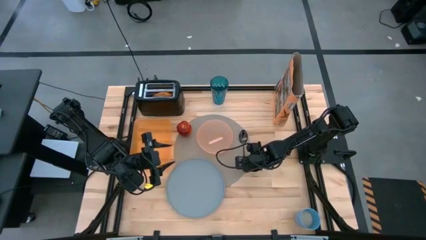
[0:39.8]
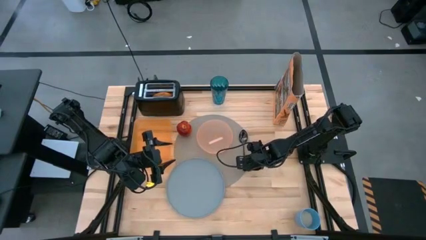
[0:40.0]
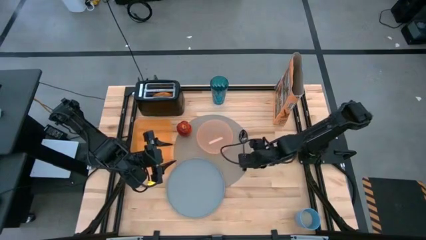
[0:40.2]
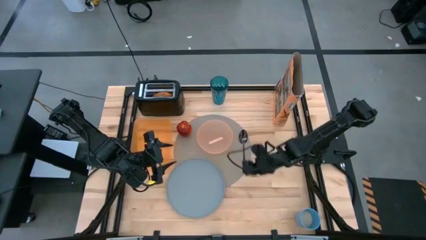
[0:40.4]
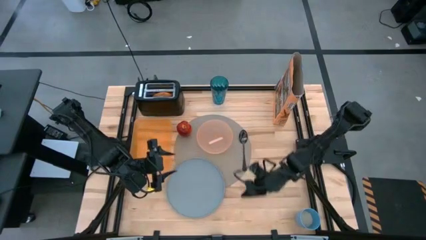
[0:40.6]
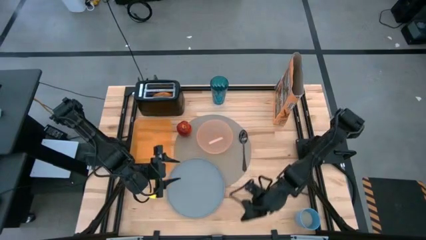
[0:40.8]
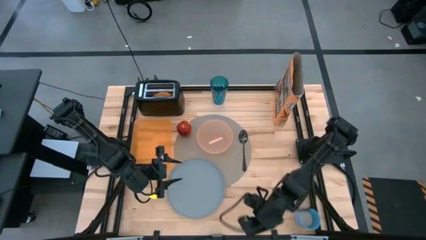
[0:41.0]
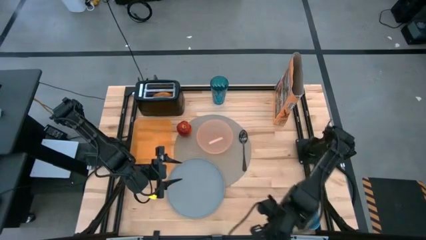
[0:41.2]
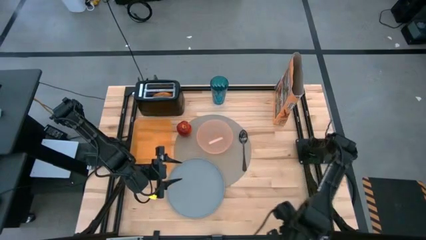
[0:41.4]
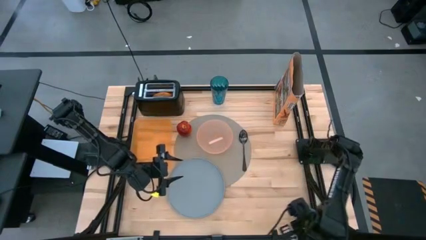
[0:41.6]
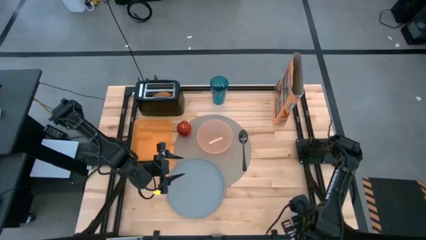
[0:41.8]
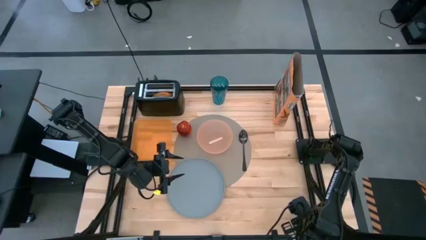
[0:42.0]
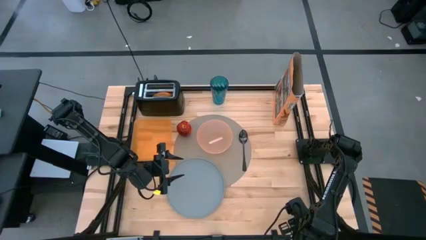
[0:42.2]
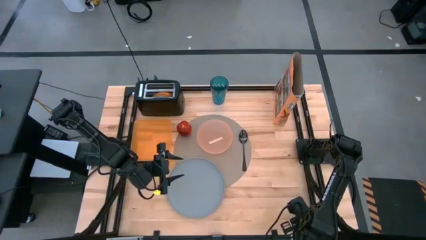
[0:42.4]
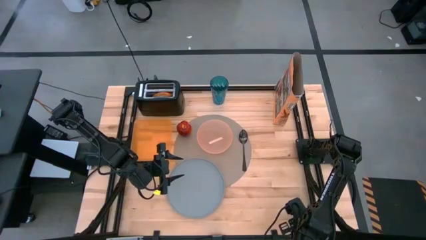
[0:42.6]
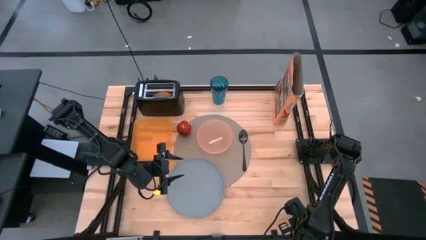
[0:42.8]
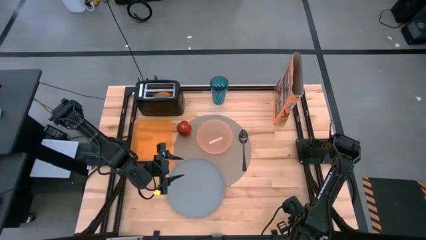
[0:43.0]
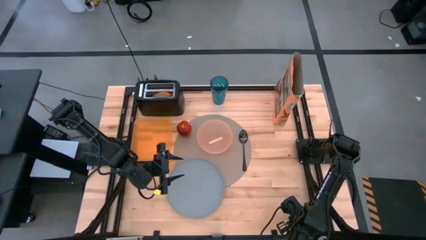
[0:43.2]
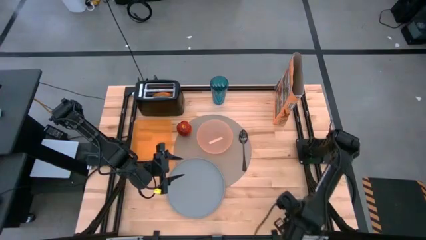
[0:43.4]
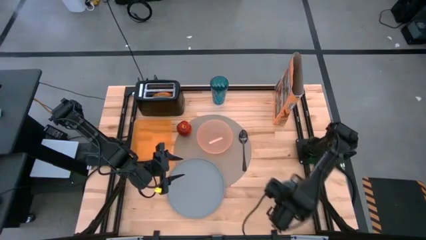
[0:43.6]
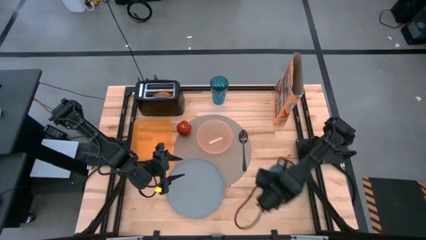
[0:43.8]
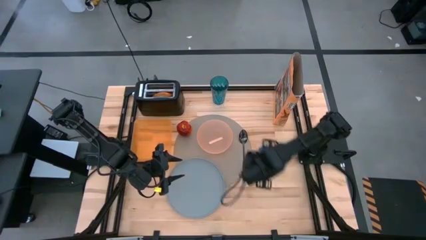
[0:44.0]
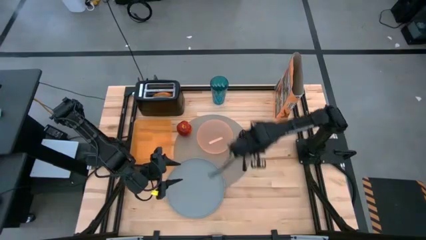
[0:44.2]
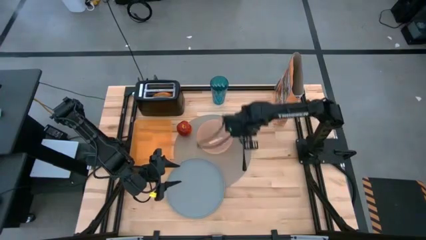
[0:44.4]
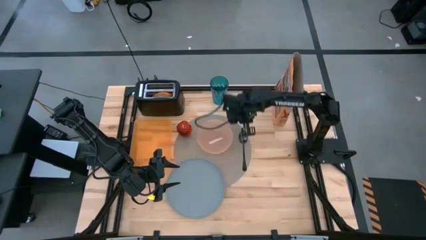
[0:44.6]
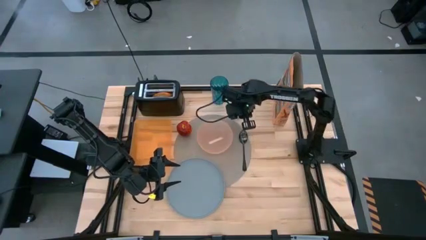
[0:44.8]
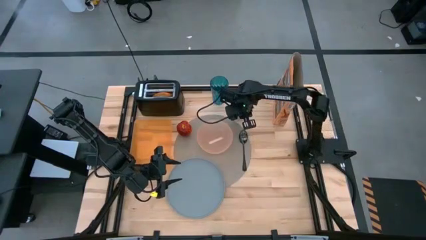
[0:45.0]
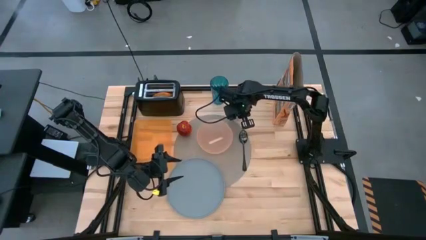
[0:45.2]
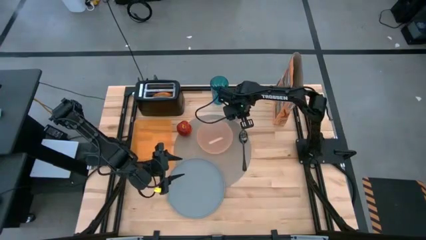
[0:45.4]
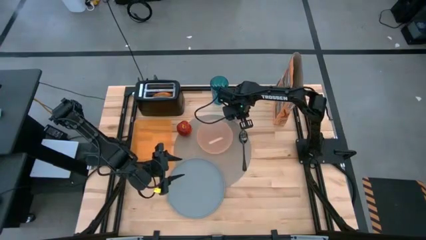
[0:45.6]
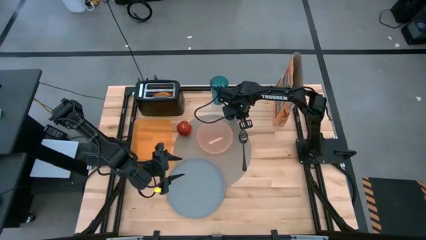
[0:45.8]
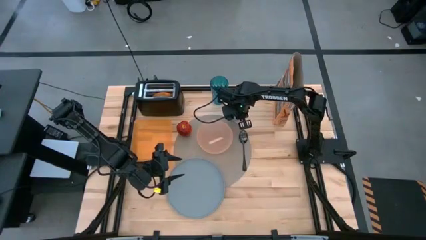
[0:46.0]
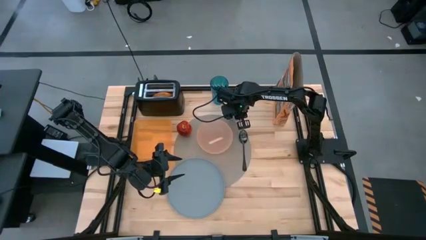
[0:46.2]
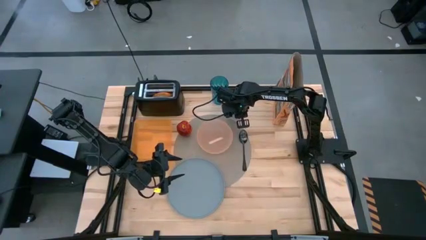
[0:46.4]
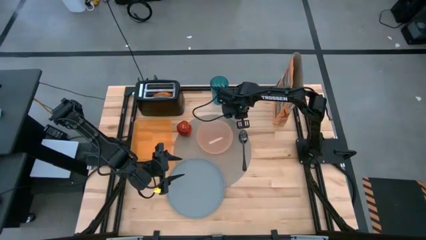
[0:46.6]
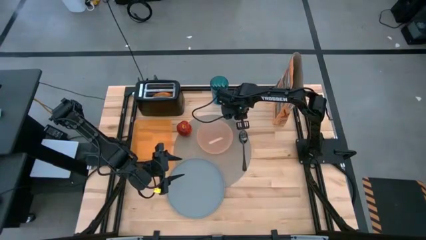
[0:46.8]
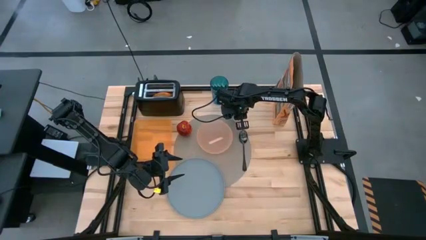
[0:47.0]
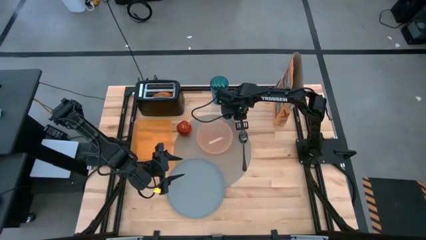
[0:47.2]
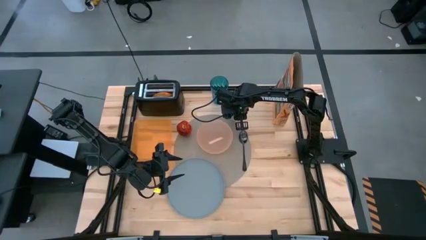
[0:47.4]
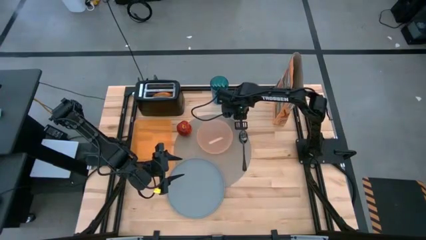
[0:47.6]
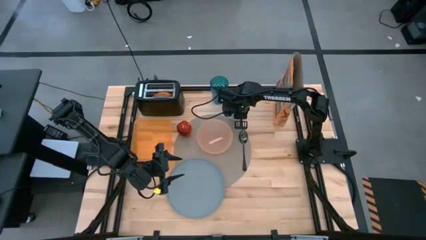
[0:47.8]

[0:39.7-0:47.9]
Task: Arrange a breakfast setting
Put the blue cup on the top right of the gray placemat on the table

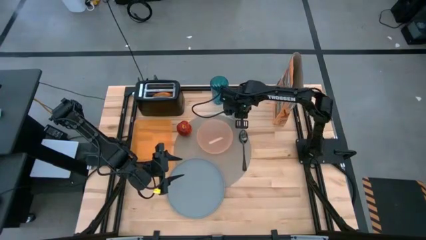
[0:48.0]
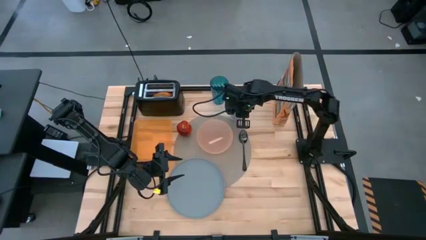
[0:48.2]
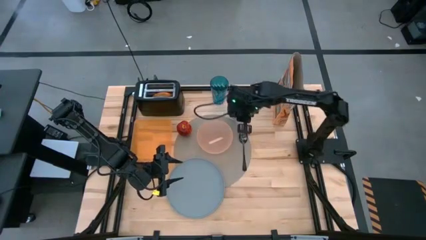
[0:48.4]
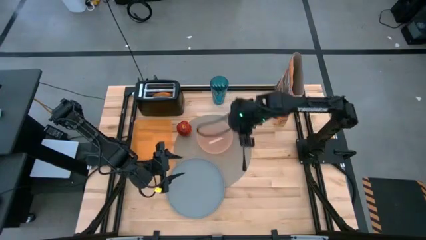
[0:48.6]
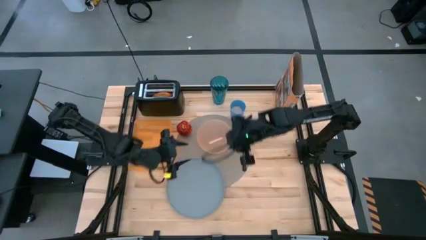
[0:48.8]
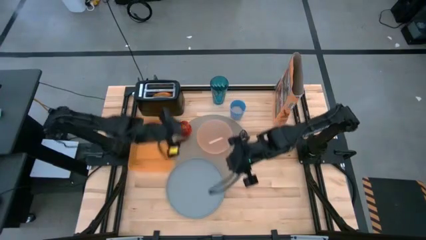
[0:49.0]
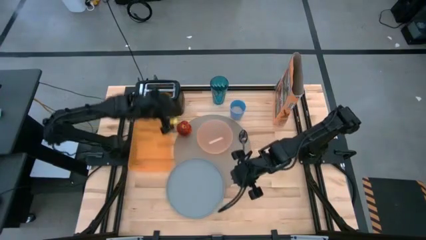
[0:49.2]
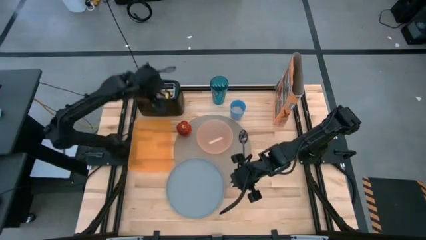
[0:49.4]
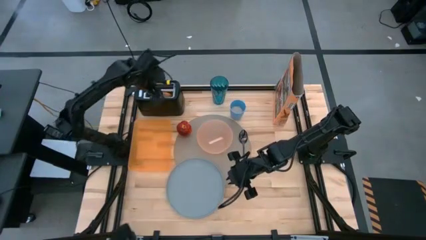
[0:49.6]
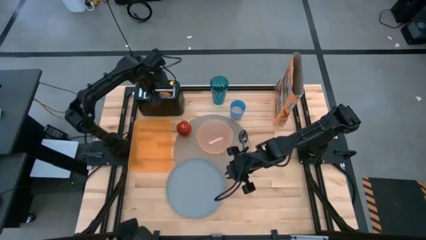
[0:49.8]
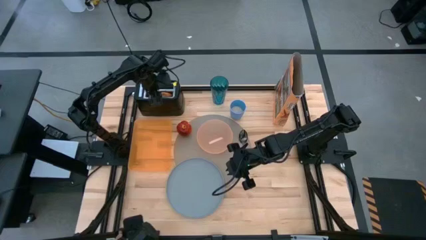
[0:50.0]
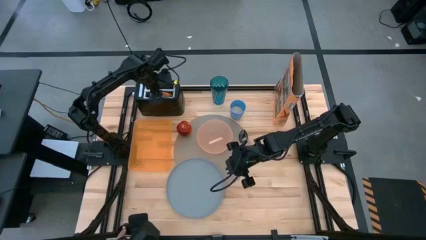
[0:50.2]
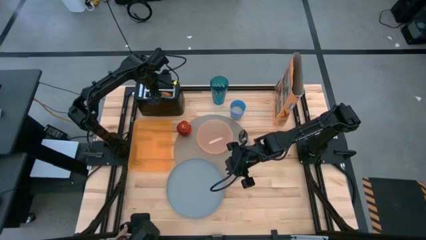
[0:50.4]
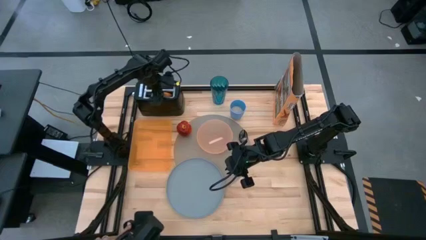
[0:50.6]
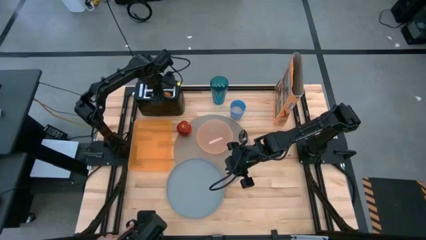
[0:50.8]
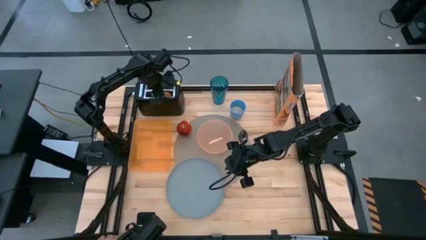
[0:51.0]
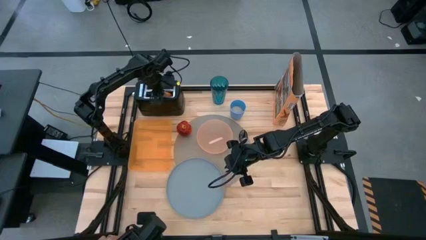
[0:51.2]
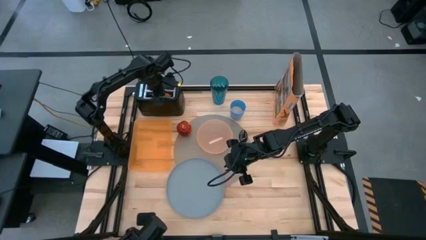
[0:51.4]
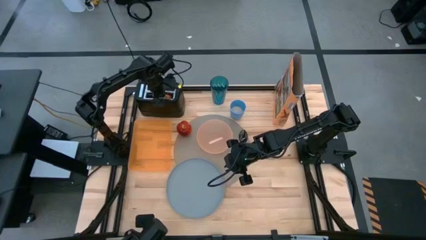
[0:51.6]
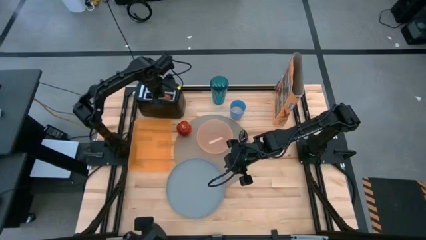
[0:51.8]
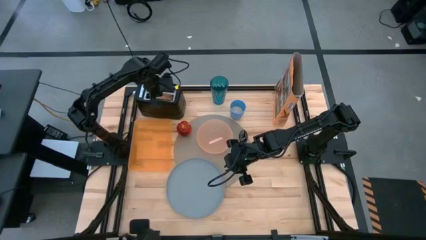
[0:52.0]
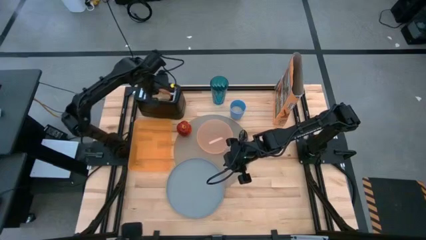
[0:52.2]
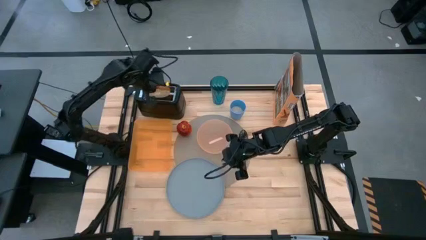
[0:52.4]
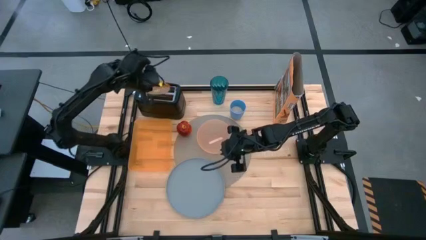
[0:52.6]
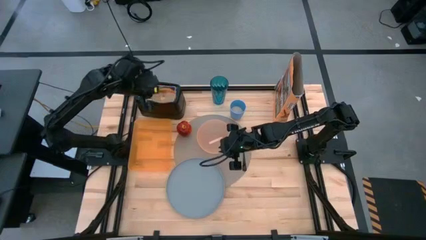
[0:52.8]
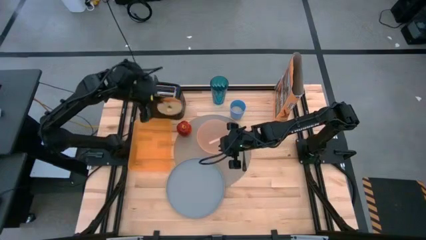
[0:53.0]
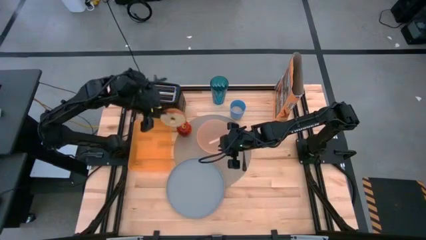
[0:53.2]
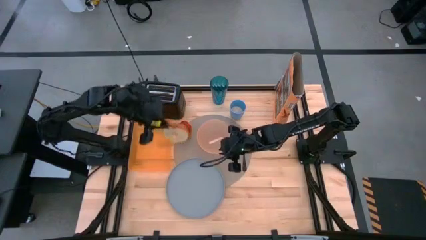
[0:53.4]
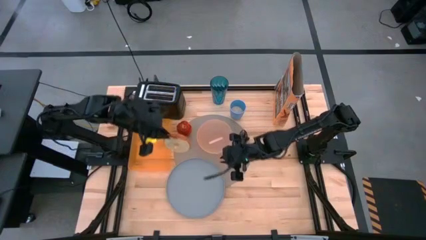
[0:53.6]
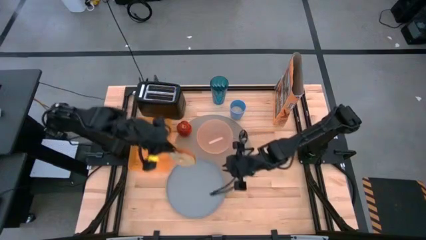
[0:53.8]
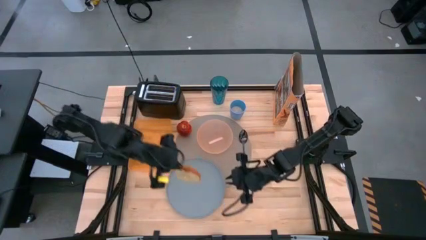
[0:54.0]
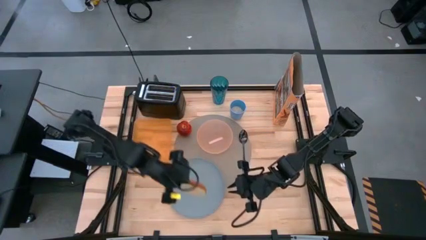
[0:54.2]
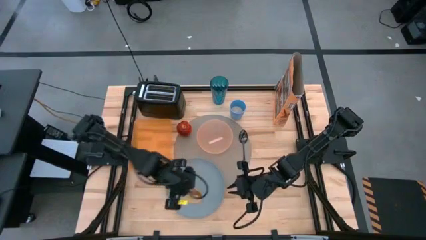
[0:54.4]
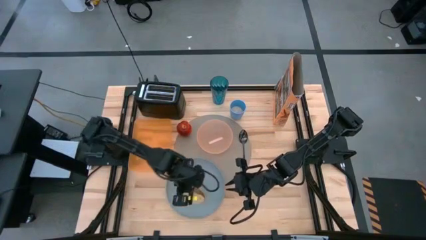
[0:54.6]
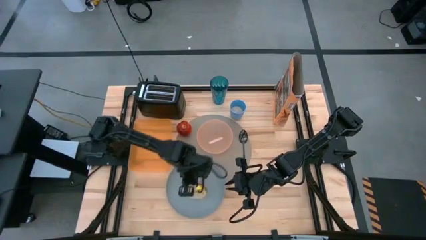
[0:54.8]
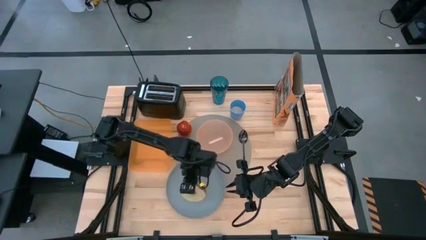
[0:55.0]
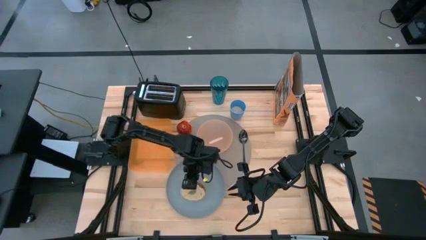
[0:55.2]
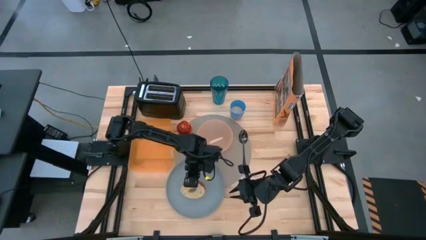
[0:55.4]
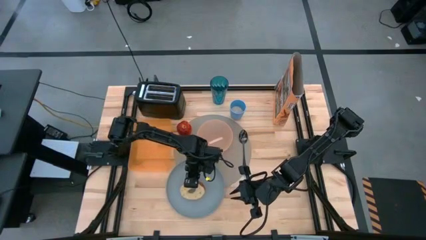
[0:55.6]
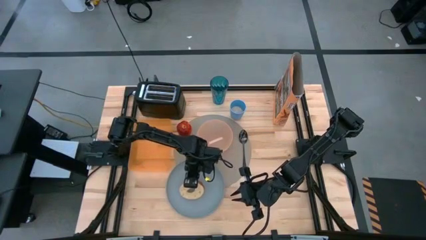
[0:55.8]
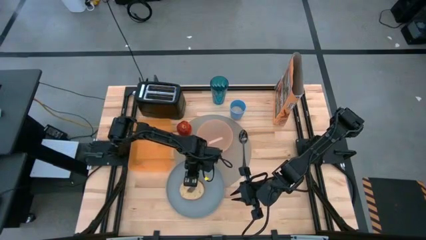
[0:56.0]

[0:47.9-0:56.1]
Put the bagel on the blue plate on the gray placemat

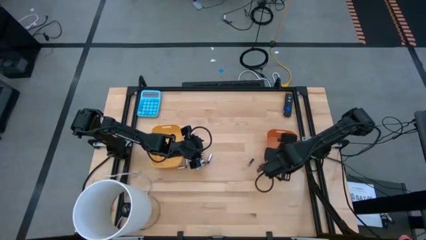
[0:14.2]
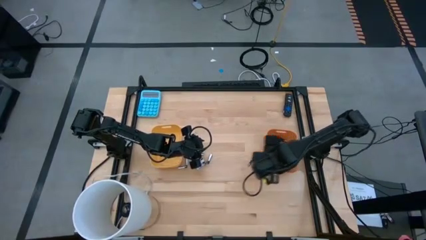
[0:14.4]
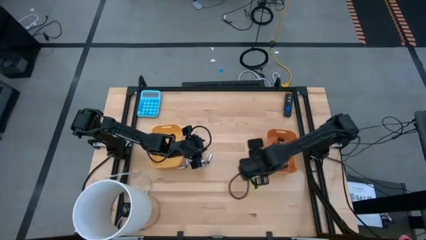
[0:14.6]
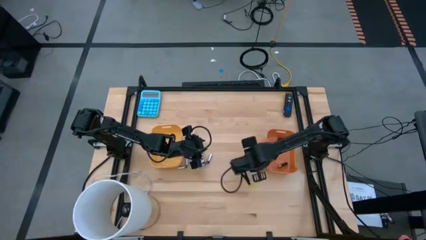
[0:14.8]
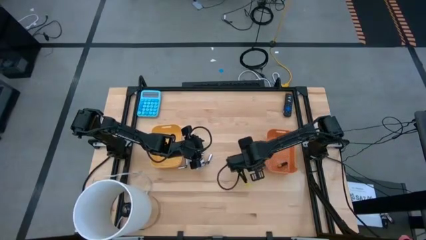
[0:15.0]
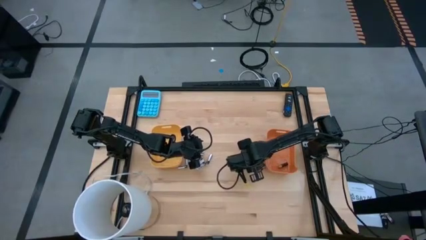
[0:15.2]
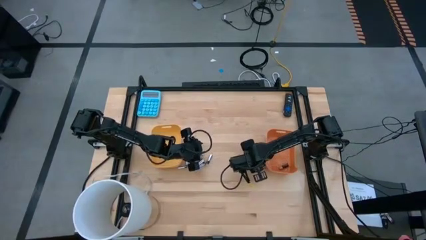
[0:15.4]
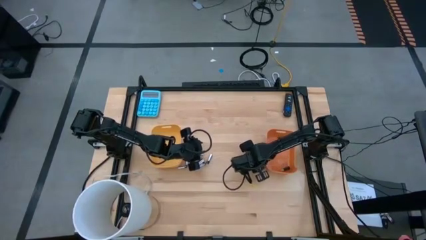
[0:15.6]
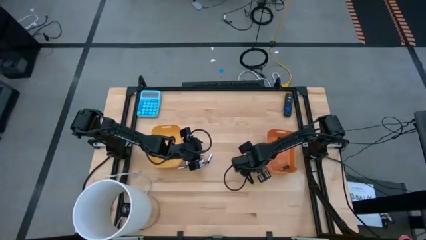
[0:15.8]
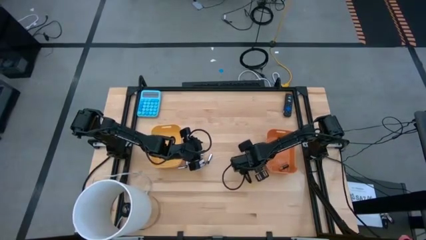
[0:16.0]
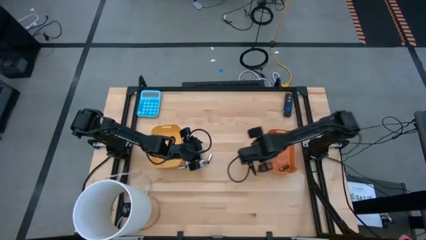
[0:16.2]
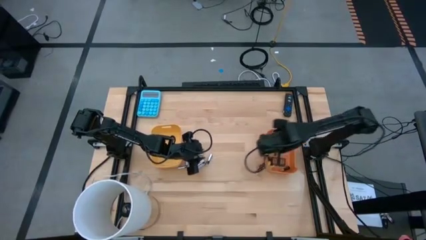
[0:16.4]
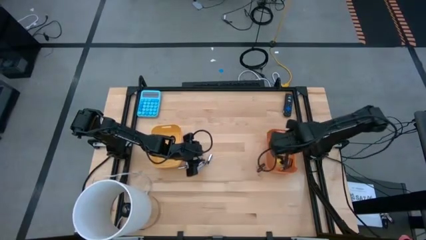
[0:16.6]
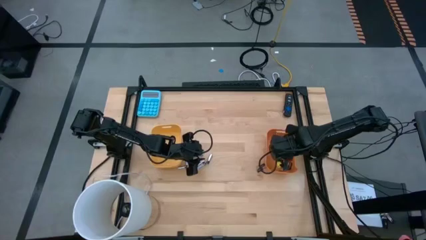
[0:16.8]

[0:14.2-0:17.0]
Task: Sort batteries
Put the black battery into the orange bin
